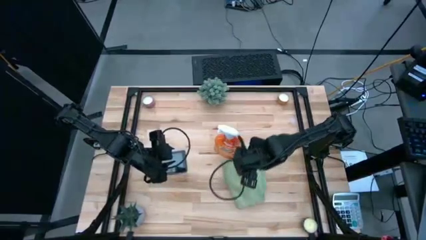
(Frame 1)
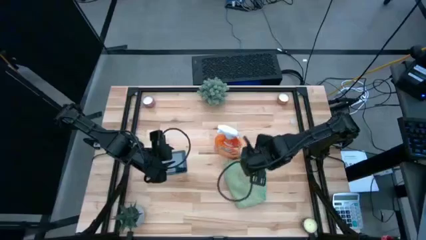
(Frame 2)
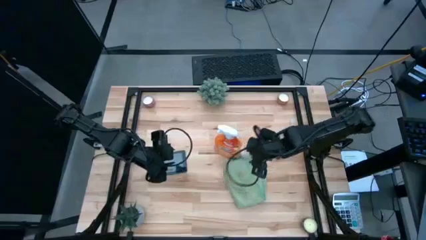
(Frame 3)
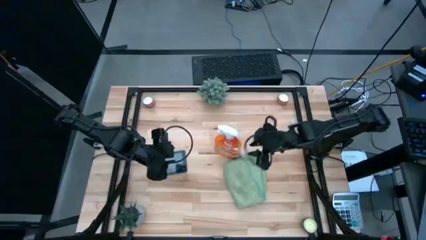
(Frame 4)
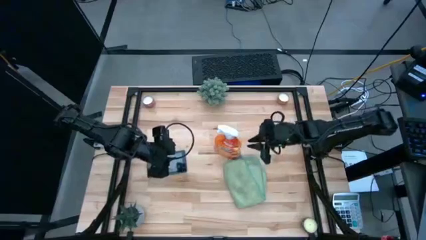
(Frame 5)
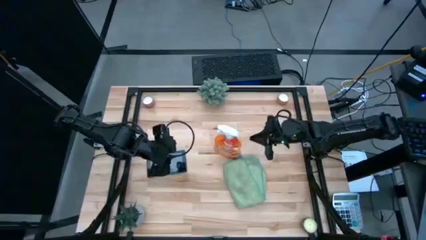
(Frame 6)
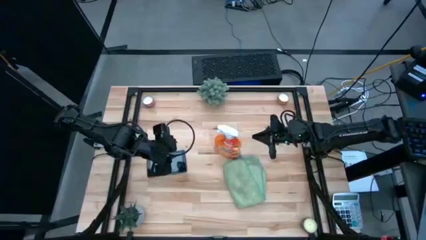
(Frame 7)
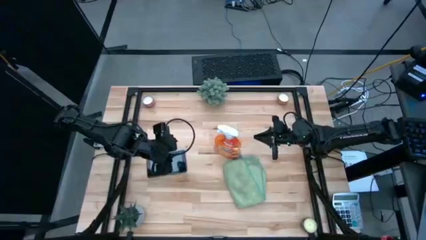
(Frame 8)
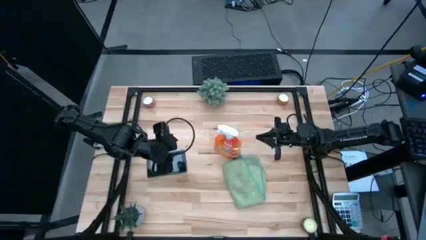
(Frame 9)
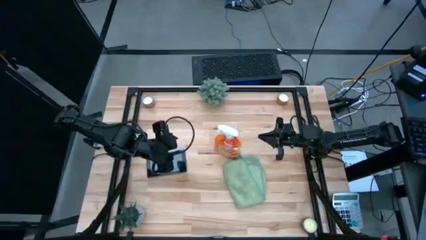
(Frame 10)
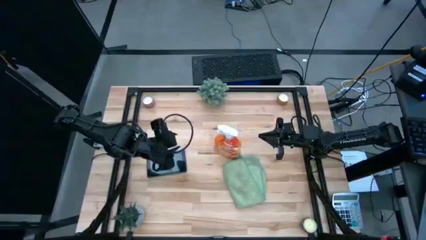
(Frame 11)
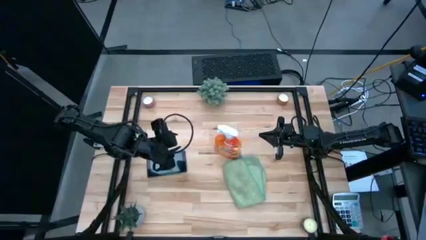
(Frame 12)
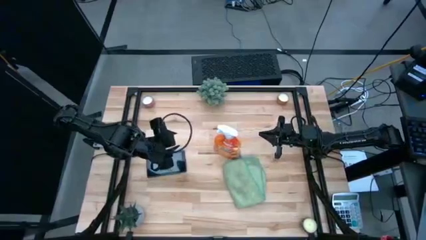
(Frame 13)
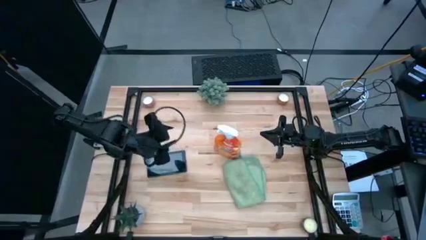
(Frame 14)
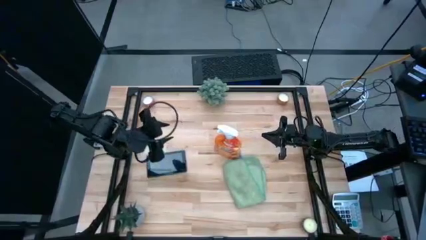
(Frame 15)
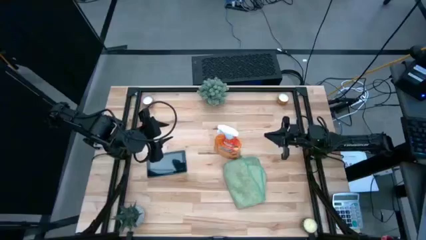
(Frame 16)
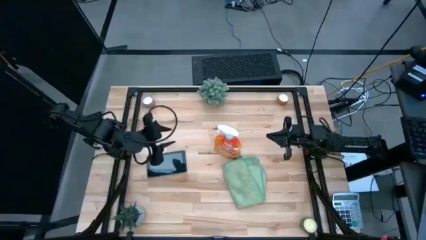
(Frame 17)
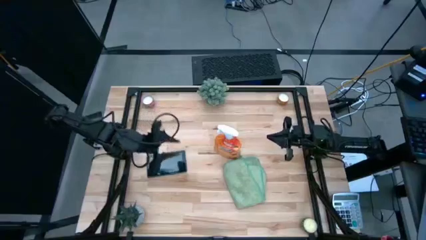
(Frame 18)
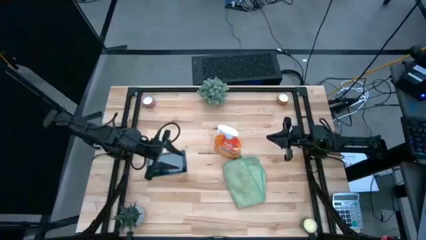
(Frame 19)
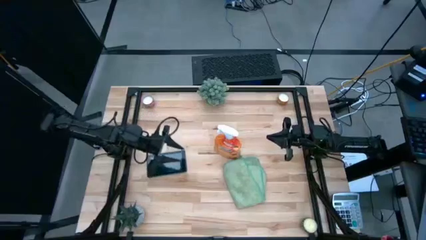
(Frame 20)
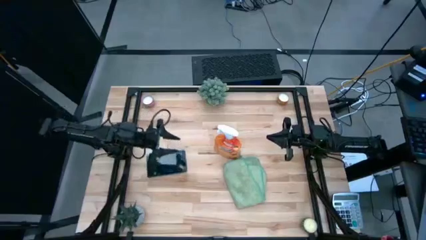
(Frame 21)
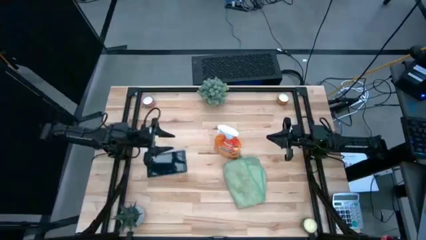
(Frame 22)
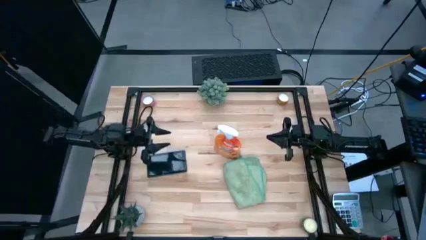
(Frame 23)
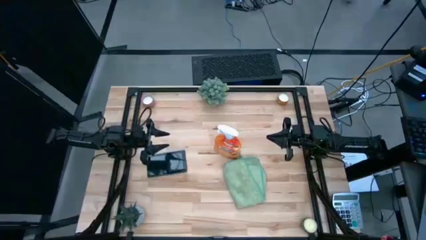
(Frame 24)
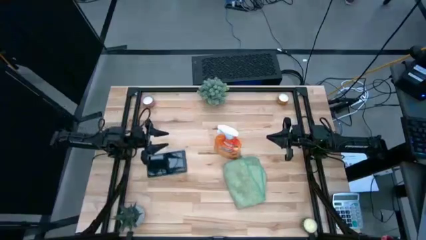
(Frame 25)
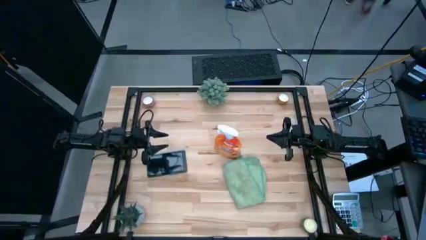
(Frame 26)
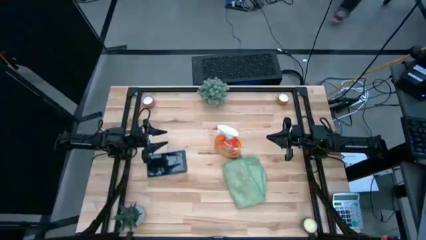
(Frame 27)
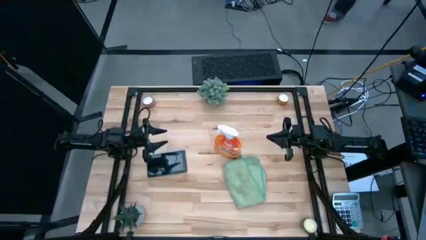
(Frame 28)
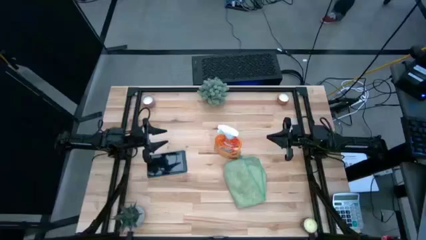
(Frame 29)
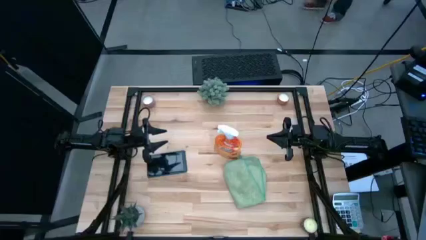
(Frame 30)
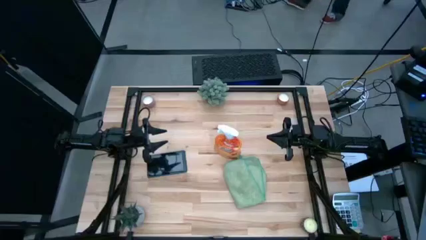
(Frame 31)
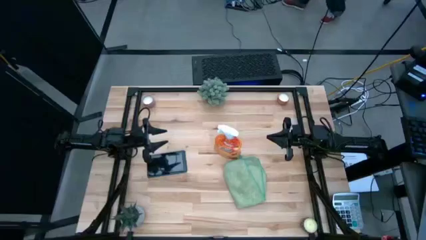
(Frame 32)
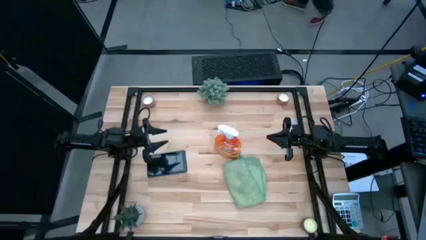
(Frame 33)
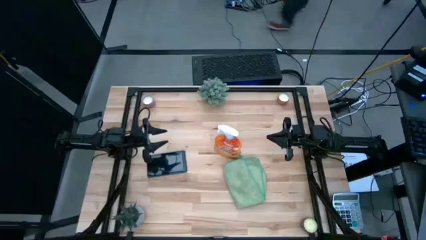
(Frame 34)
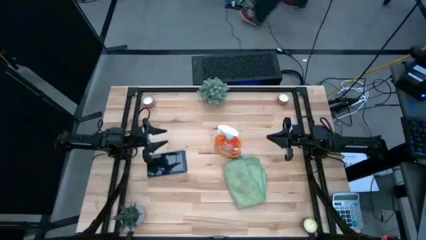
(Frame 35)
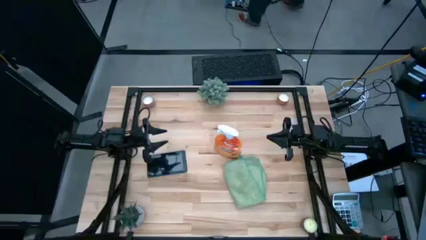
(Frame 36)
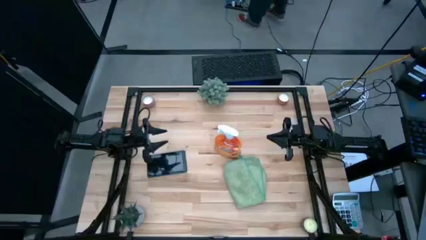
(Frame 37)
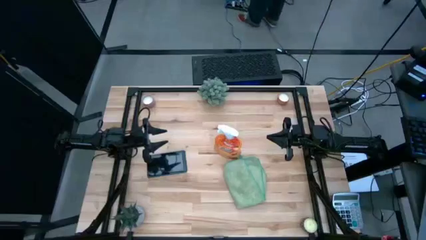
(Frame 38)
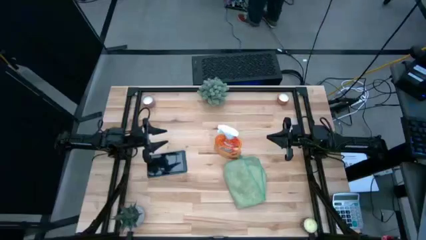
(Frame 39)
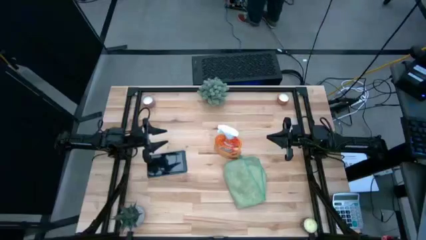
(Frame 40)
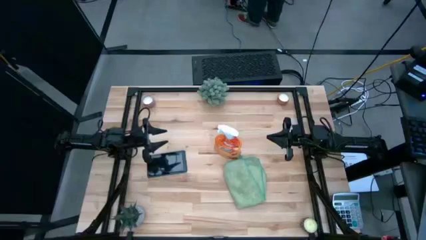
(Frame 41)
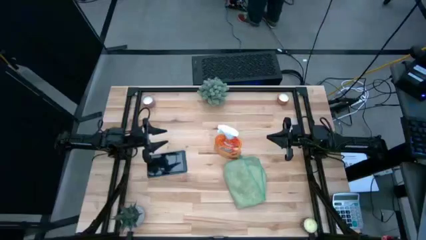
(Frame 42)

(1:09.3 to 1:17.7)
Task: Apply microfiber cloth
Return to Home Position
